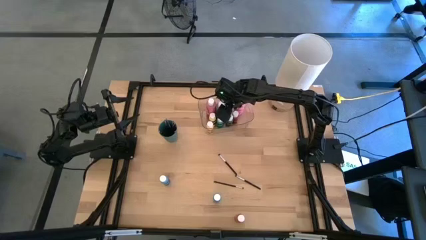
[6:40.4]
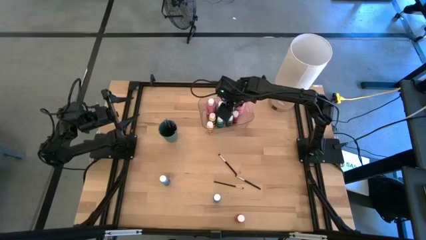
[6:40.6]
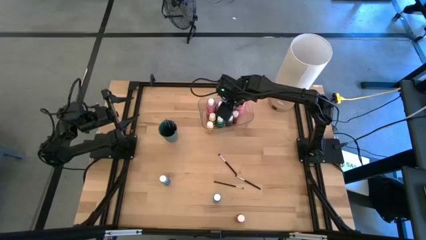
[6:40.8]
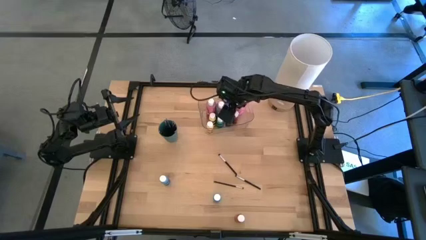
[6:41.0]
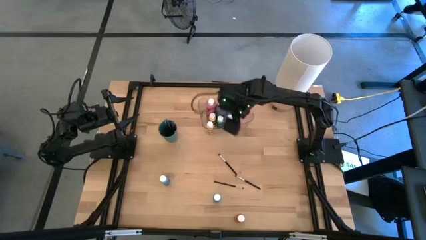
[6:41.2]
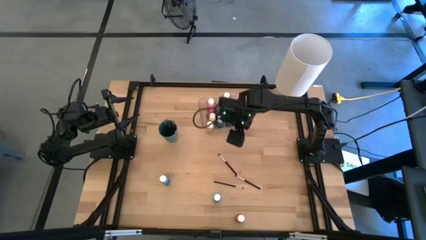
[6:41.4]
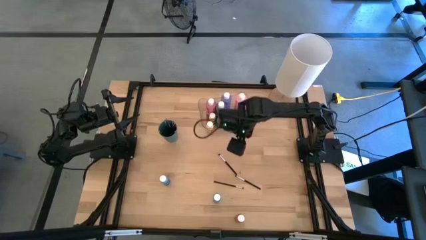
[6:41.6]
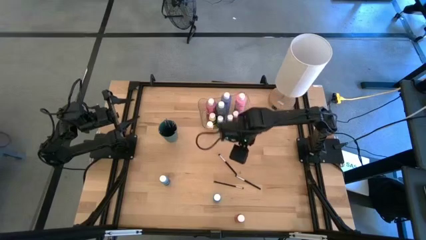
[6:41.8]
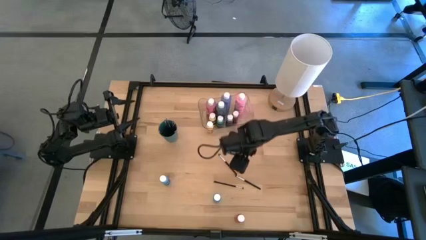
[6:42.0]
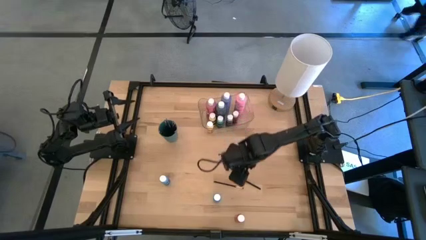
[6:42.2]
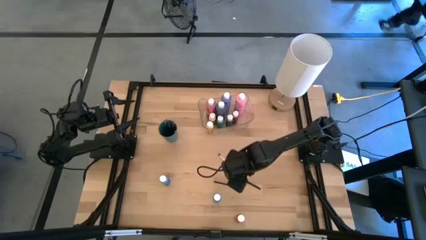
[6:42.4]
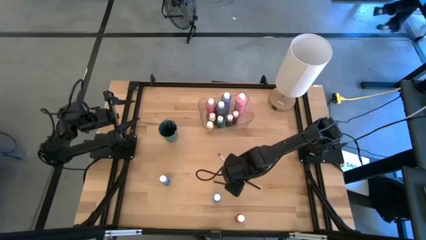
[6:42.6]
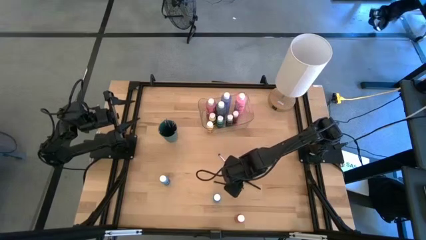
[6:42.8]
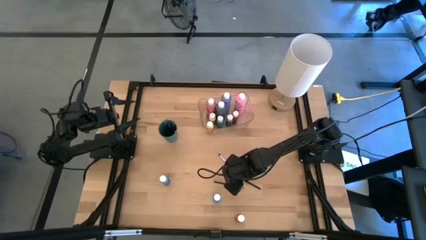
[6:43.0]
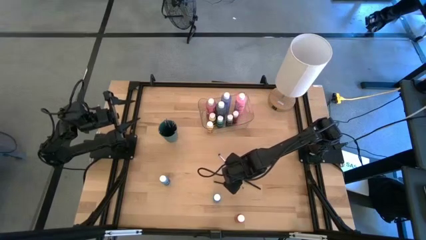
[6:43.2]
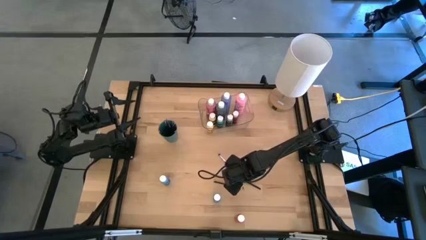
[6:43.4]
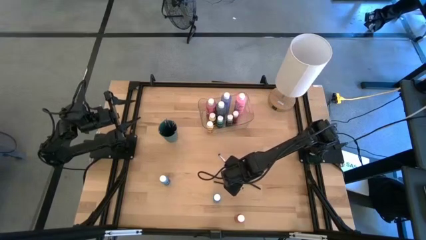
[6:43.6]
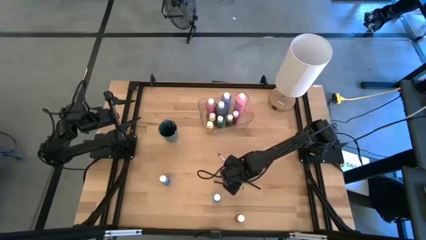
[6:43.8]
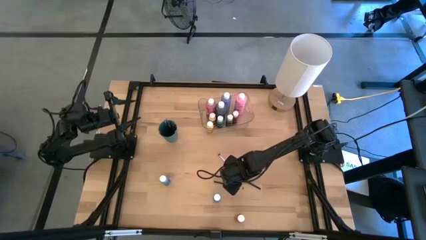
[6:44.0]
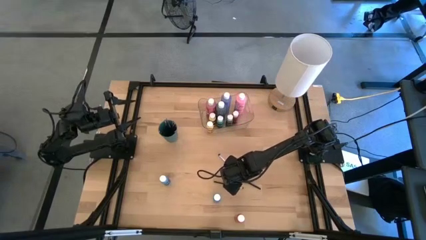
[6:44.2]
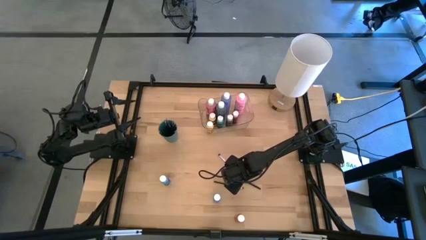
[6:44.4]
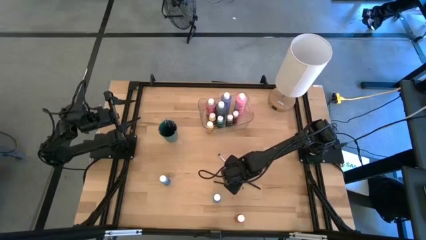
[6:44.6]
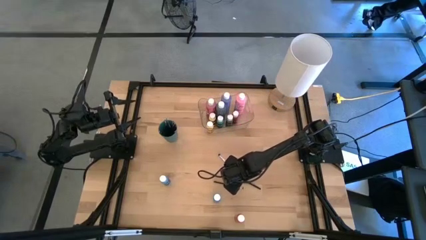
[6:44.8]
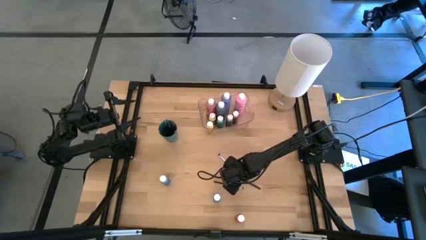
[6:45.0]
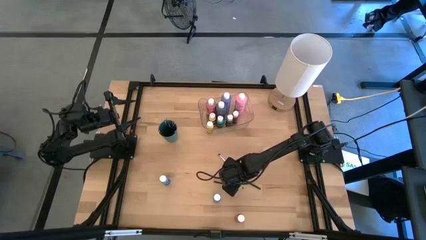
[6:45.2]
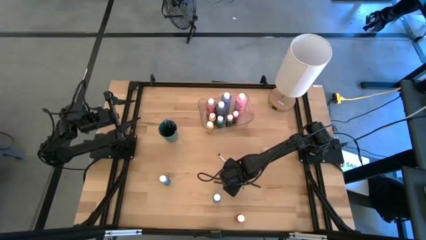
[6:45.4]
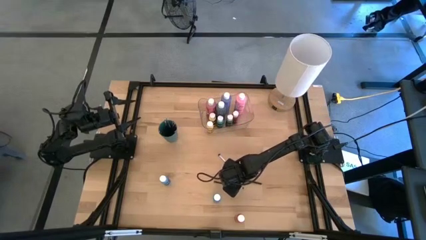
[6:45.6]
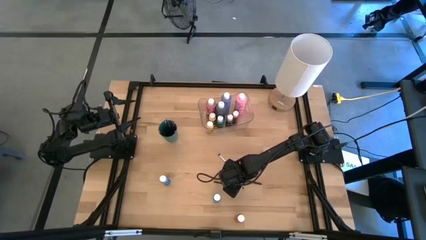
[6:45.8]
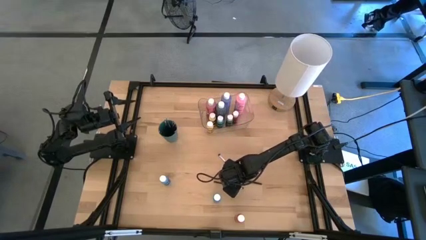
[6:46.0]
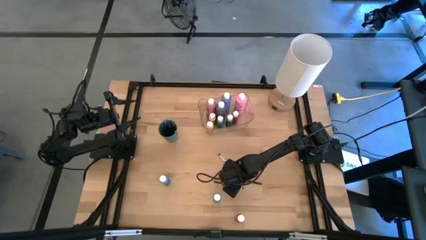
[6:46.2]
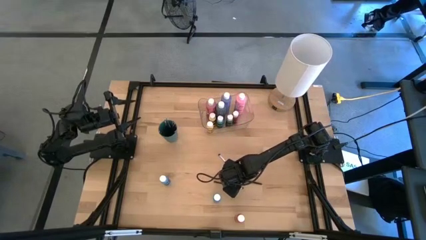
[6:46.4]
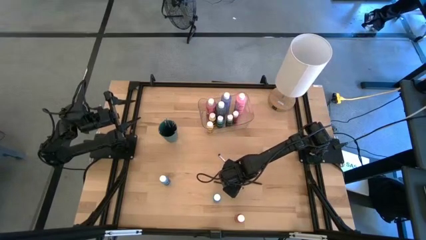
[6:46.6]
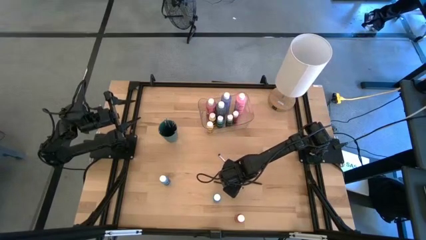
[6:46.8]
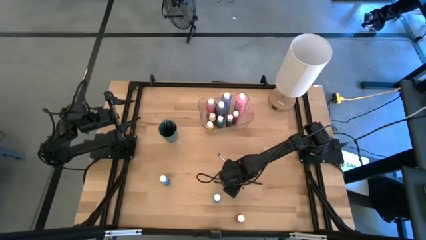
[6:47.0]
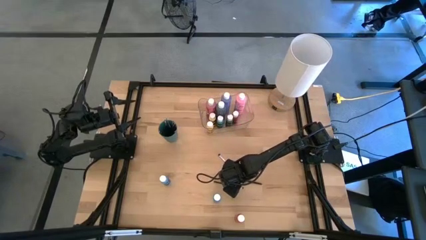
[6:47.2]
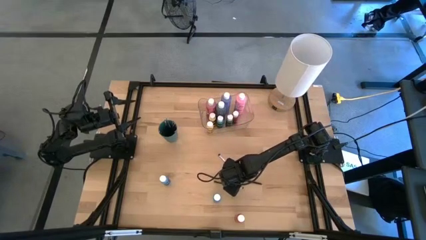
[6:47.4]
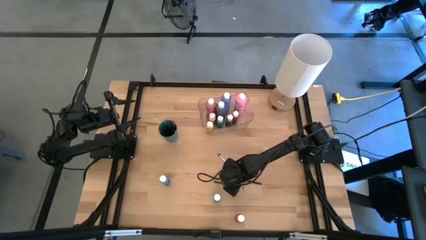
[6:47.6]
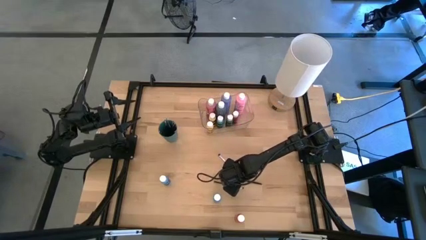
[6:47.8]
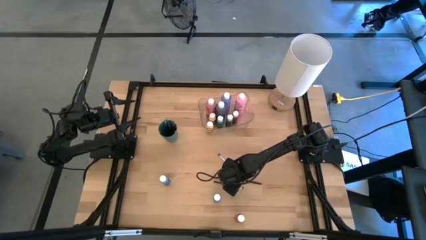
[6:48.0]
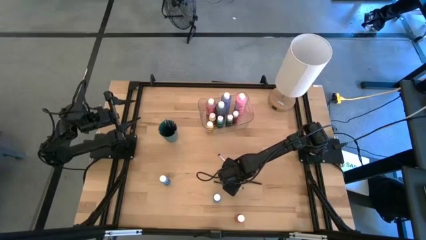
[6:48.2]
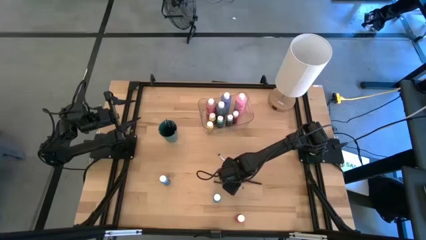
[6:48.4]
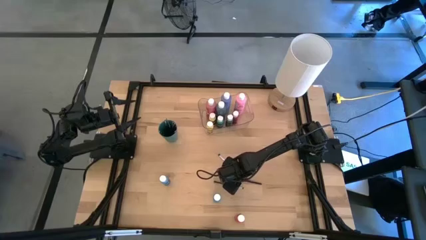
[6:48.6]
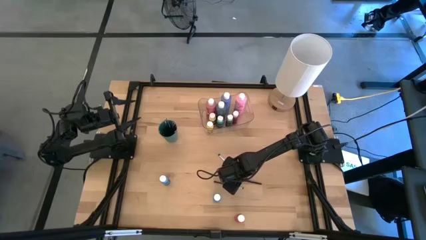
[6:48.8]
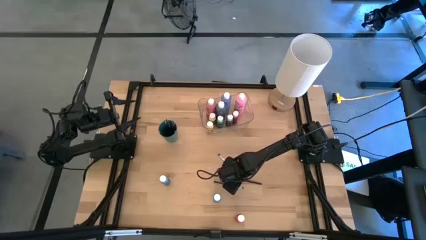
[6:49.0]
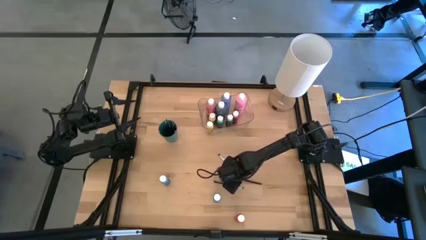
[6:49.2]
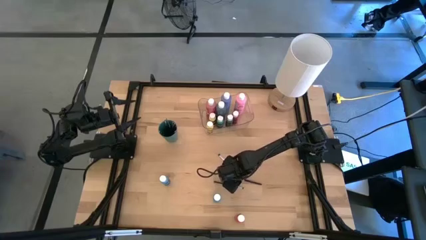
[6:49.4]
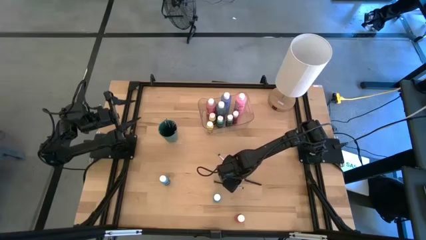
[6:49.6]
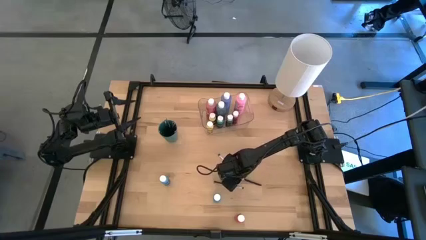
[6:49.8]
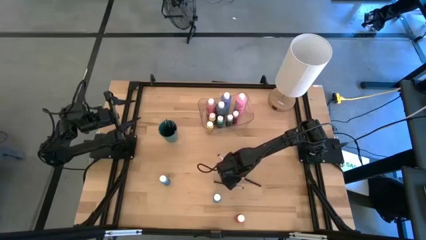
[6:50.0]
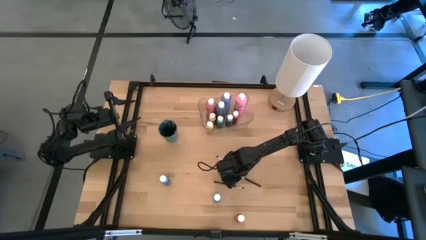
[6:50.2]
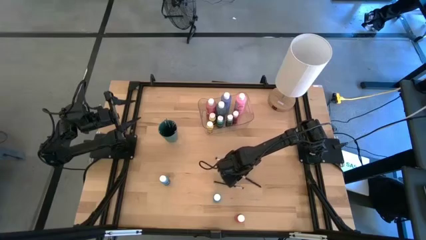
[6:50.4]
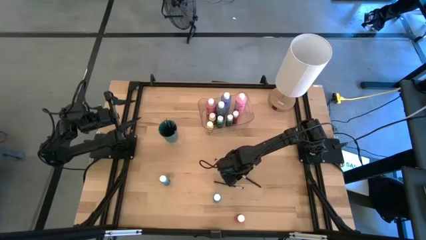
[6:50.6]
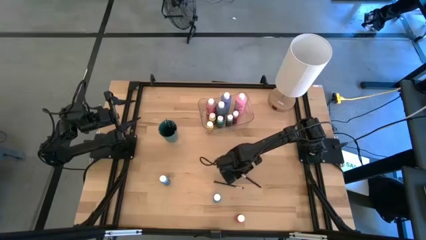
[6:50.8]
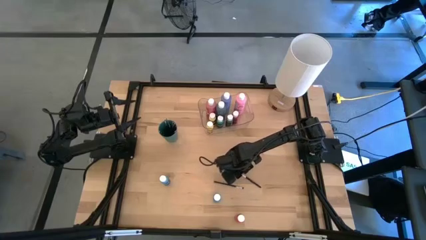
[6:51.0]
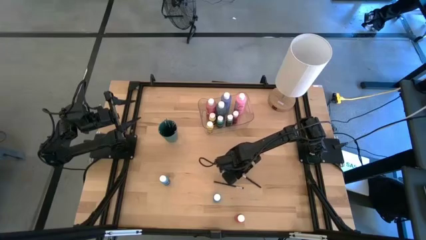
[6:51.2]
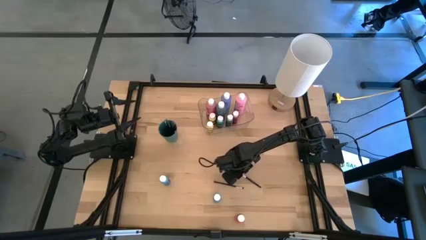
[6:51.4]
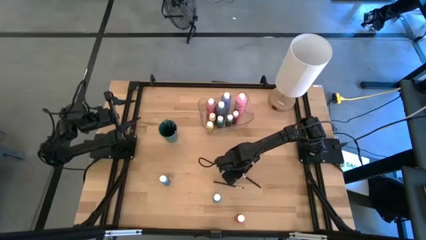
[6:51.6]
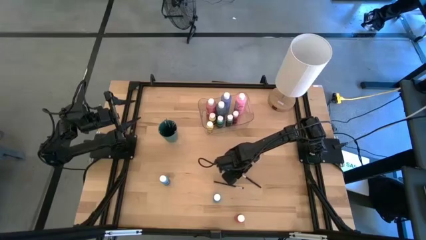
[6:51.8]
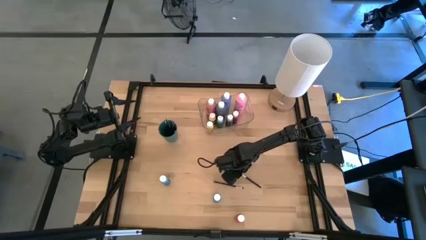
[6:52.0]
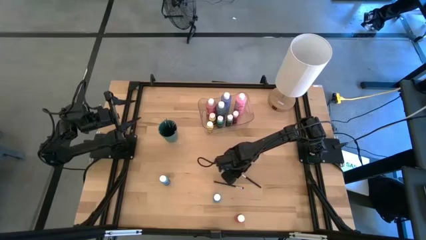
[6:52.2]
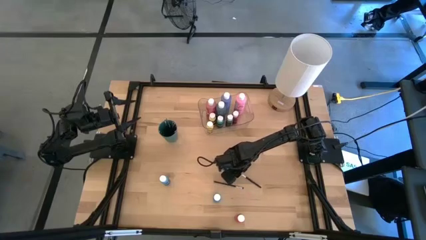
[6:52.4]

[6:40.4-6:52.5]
Task: Pick & Place Paint Supplies
Put the black paint brush into the green cup

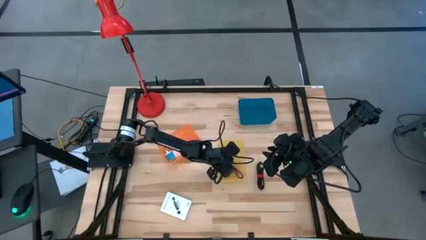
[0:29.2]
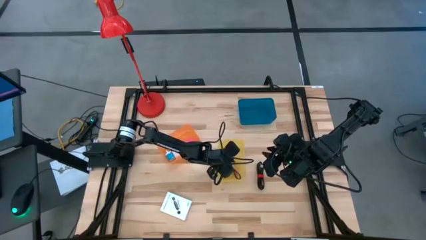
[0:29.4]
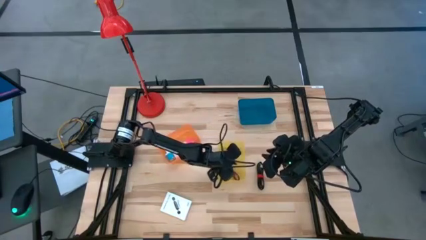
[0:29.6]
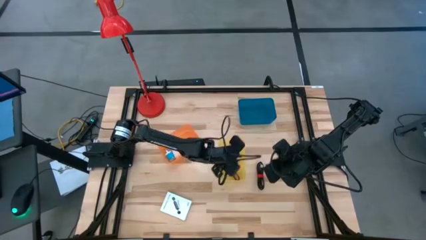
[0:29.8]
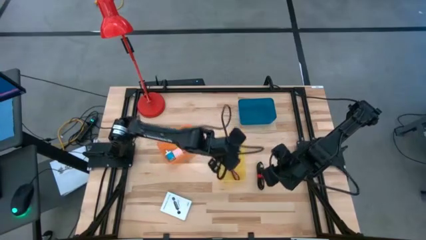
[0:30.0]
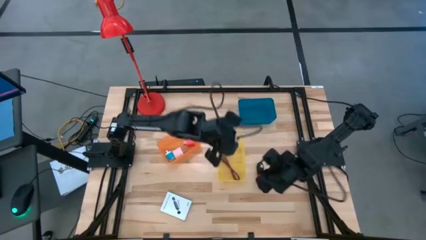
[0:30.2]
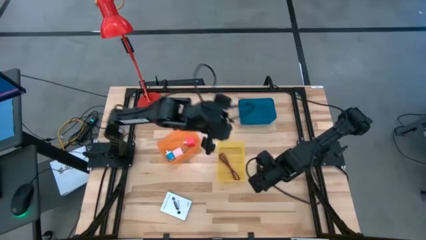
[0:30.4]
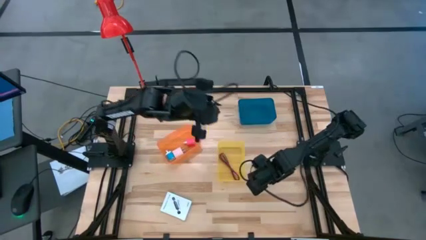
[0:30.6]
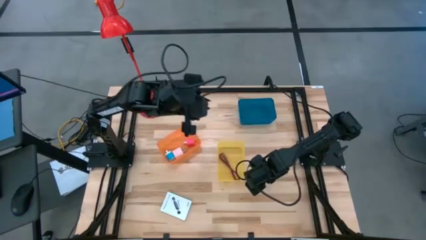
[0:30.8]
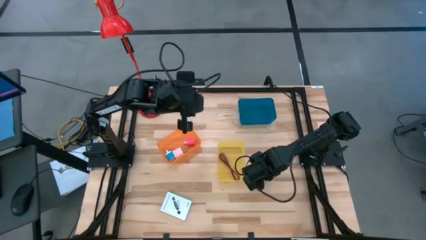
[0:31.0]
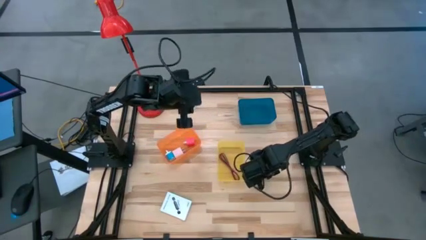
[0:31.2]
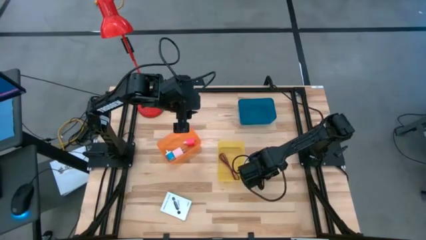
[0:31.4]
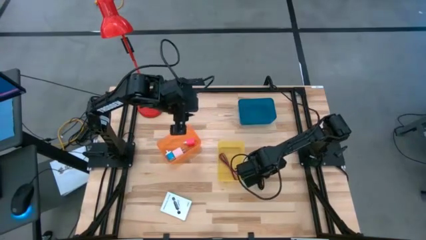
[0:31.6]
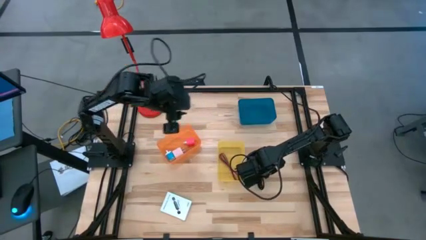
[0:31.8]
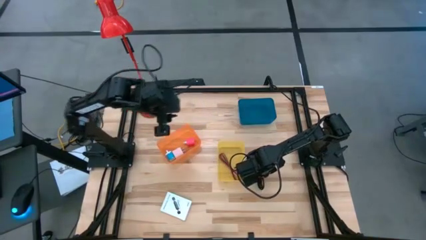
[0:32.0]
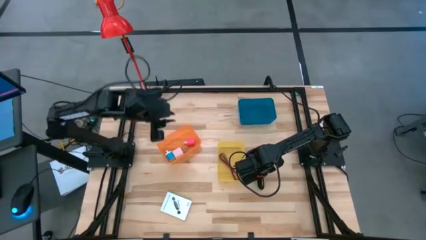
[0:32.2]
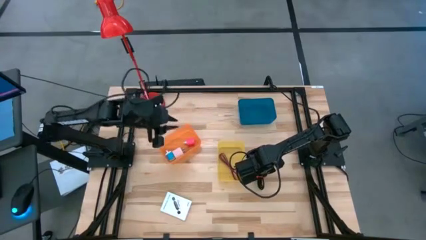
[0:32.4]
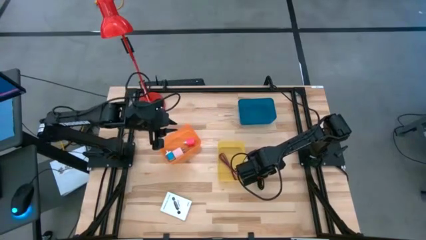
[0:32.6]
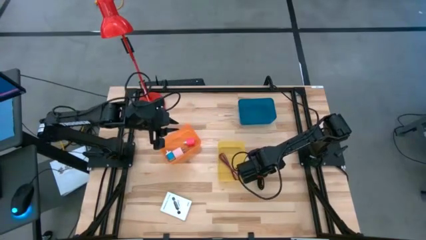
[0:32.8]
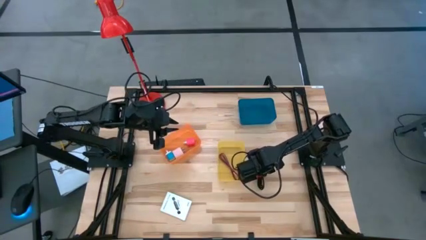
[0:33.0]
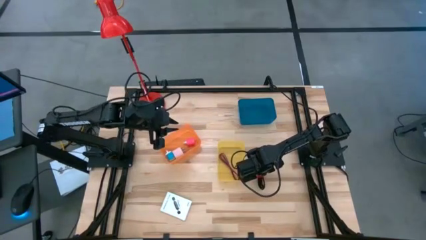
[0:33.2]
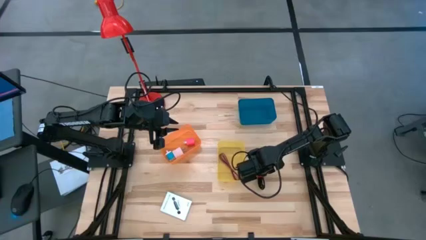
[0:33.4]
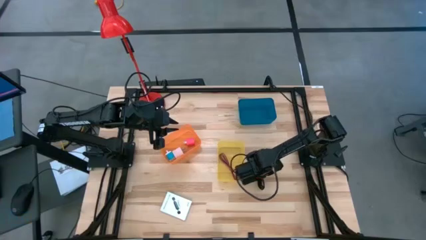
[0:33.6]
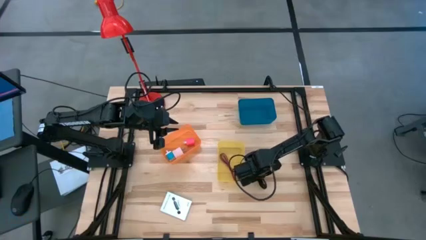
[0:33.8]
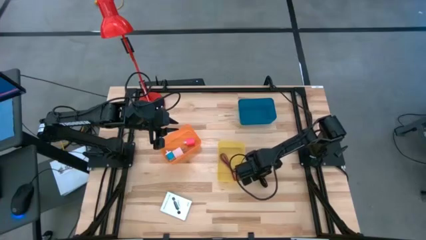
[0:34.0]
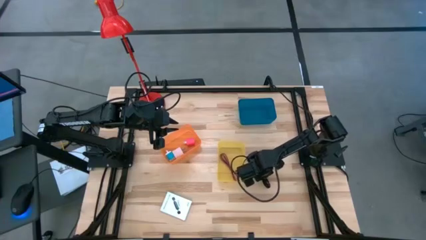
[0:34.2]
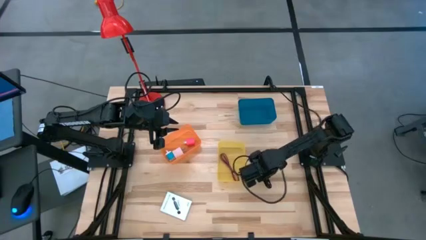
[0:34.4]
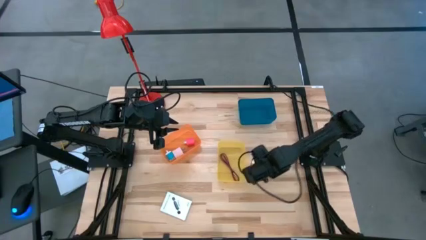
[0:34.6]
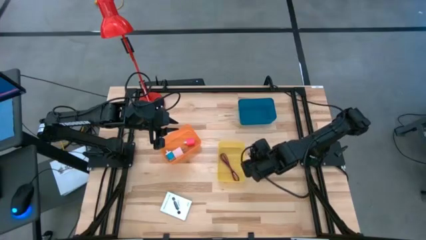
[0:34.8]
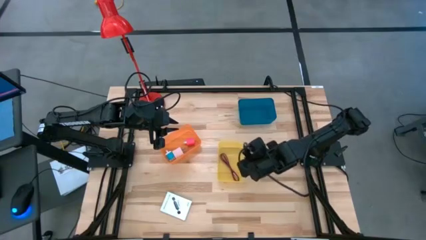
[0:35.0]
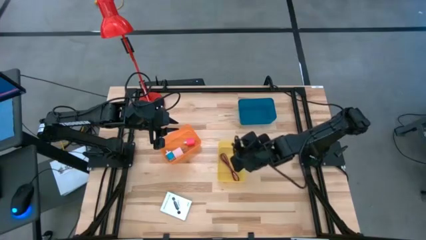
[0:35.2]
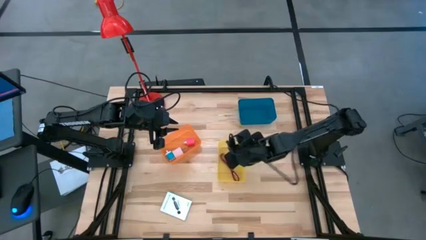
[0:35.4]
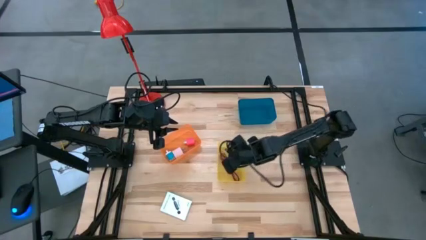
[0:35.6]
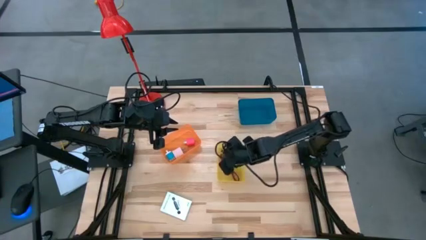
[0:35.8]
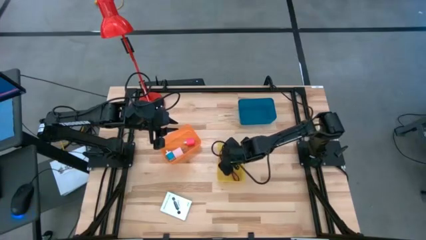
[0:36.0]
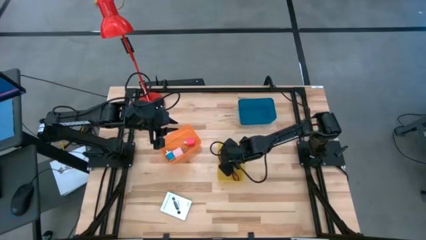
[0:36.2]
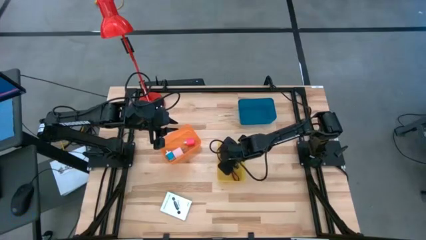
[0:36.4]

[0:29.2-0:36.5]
Task: Pick and place items into bin
Put the black charger cable into the yellow bin
